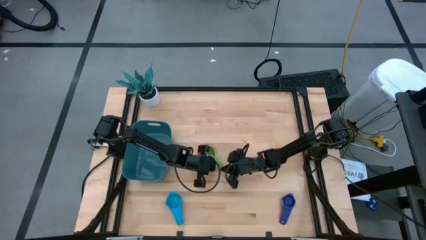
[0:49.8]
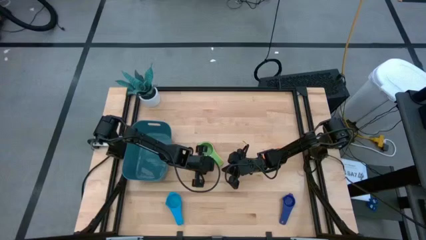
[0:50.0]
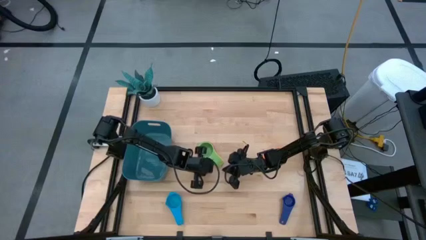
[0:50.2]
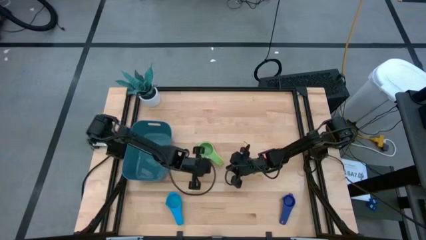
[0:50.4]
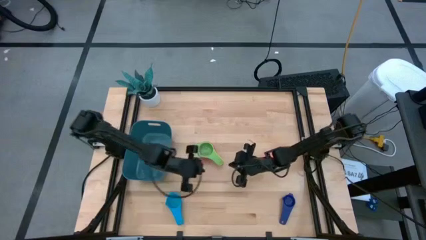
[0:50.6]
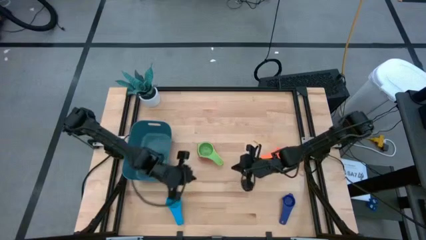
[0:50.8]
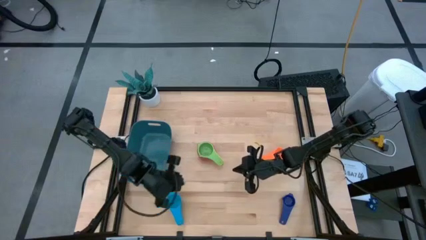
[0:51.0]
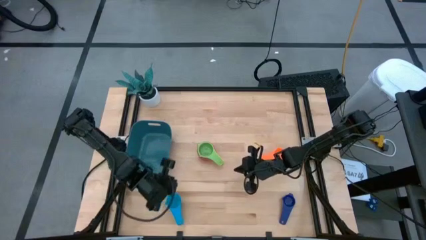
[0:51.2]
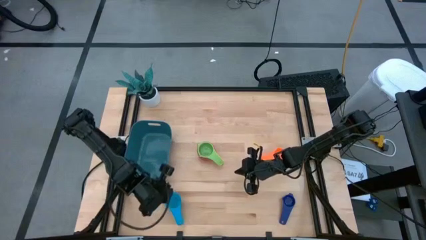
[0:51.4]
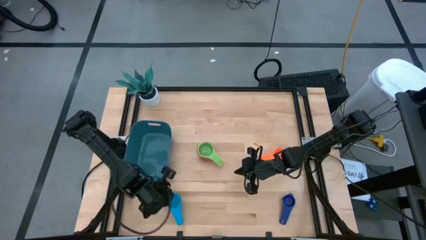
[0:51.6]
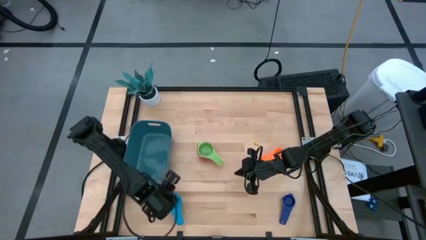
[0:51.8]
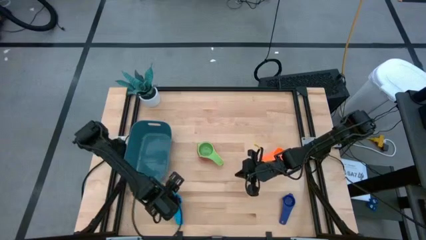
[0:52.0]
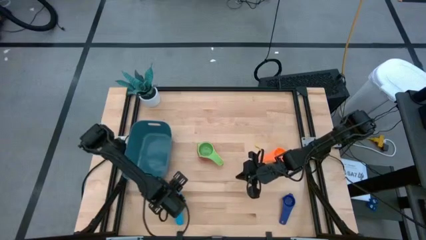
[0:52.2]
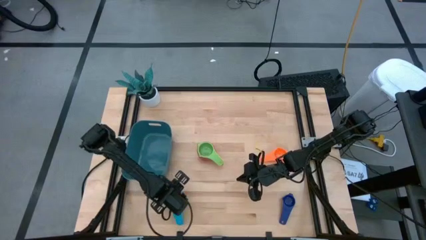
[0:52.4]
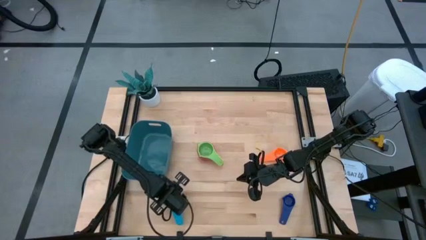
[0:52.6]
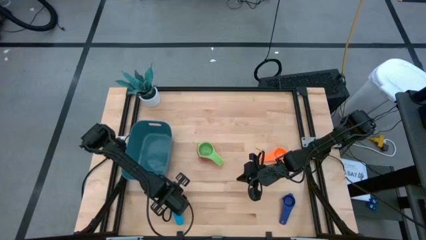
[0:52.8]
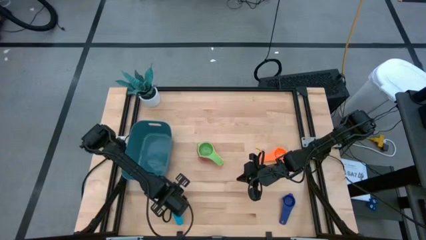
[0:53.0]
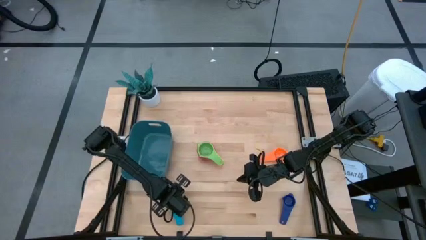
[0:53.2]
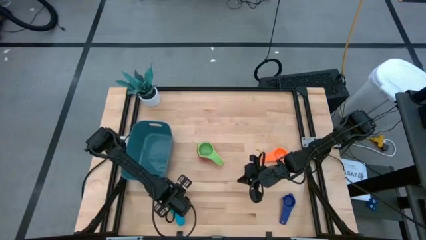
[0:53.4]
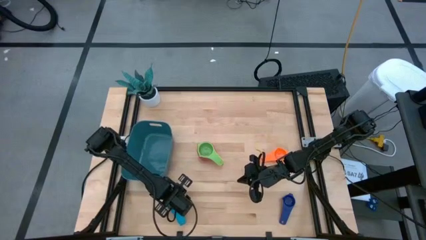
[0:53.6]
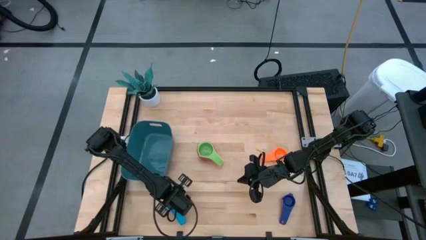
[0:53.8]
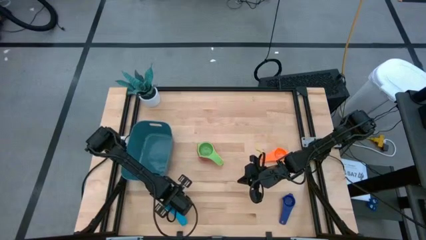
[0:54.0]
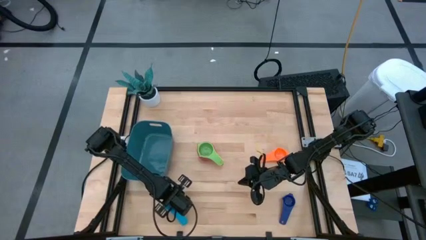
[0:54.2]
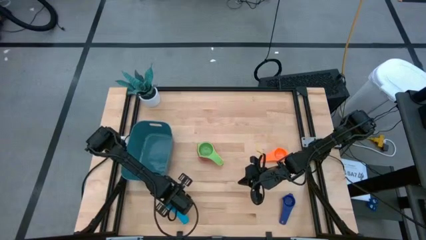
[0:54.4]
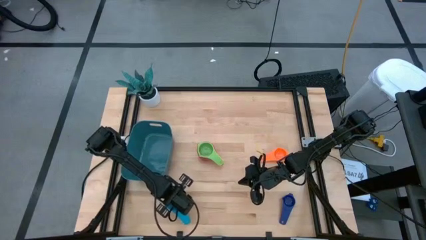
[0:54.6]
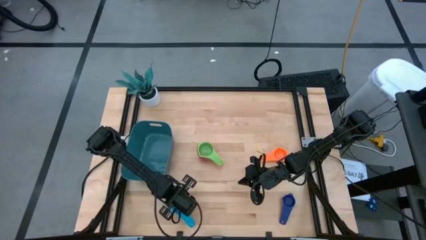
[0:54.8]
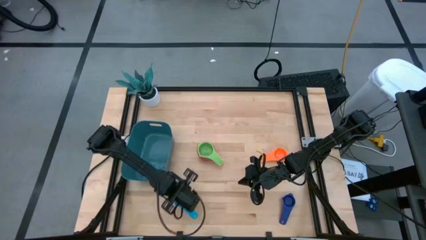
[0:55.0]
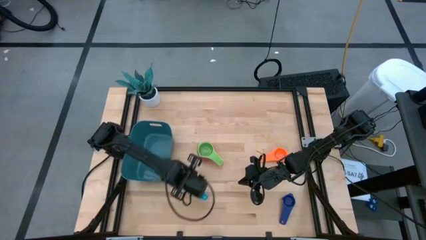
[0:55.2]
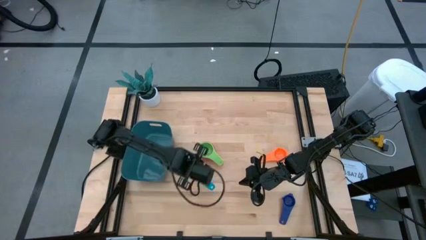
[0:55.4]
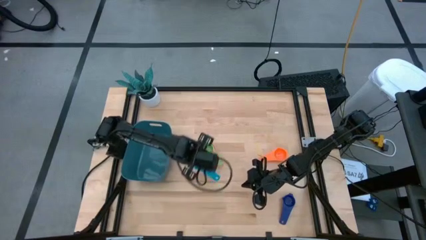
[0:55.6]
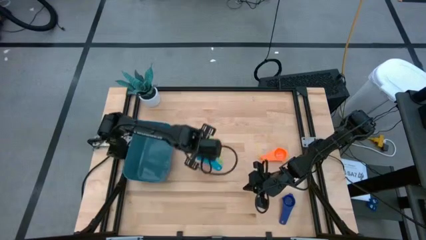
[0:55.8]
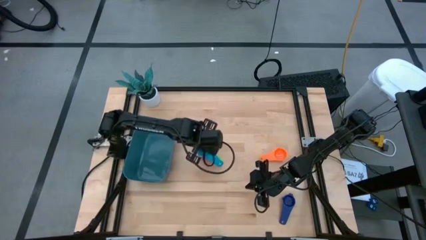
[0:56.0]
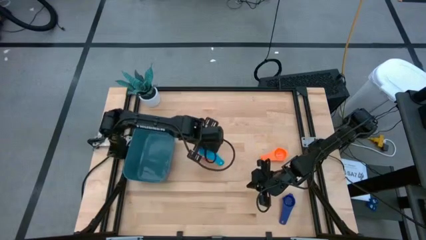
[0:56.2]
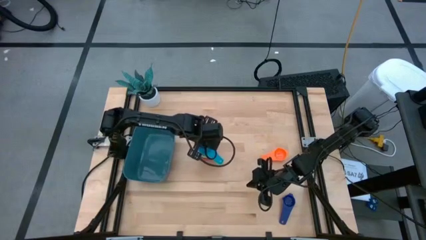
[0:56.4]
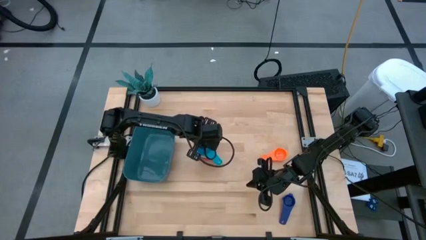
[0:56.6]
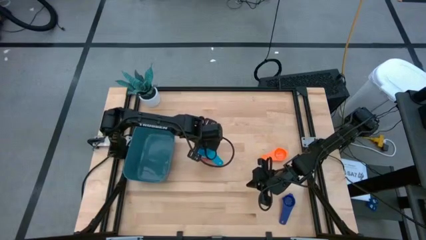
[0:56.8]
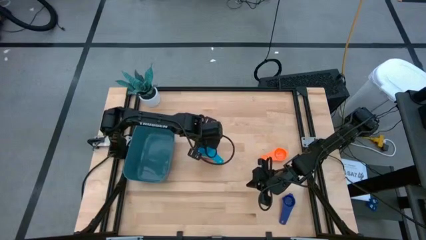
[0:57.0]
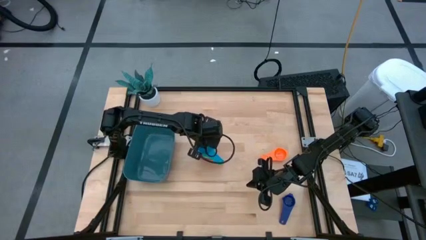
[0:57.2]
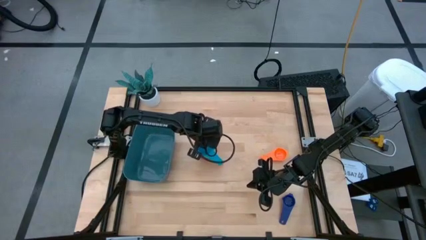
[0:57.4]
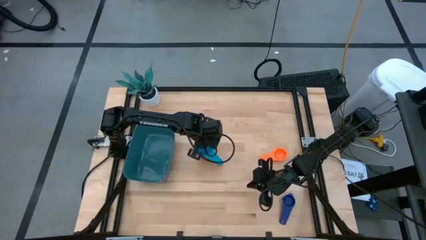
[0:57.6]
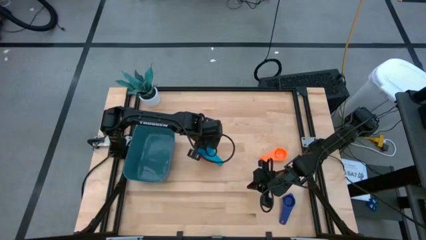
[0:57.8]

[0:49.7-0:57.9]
Task: Nest measuring cups in basket
Stack the light blue measuring cup on top of the green measuring cup

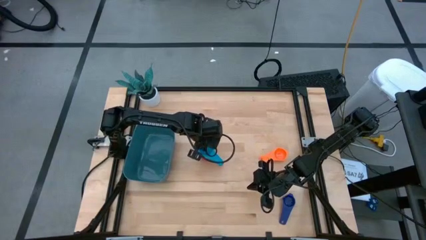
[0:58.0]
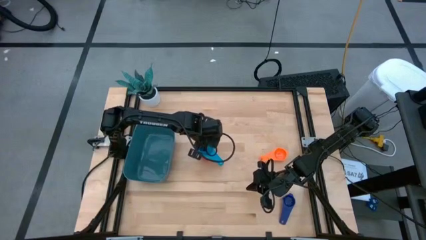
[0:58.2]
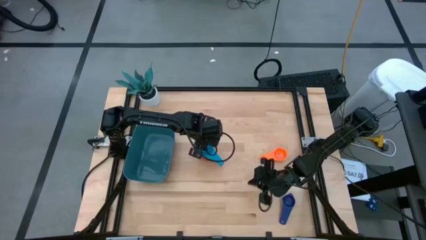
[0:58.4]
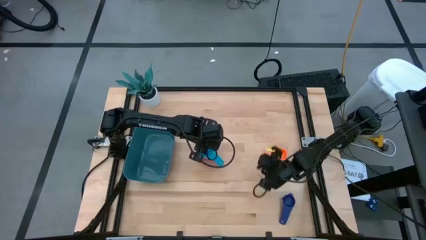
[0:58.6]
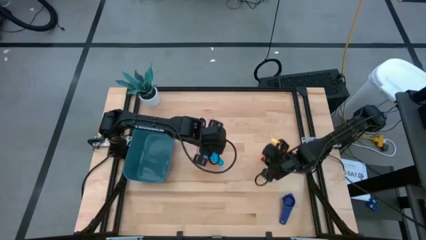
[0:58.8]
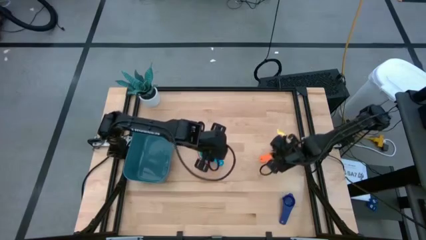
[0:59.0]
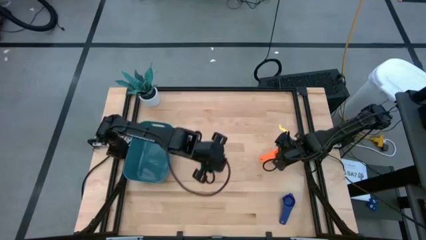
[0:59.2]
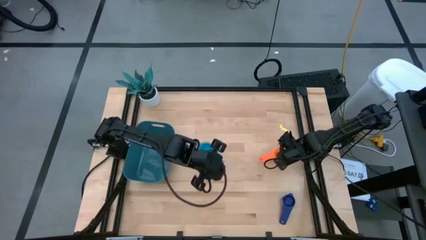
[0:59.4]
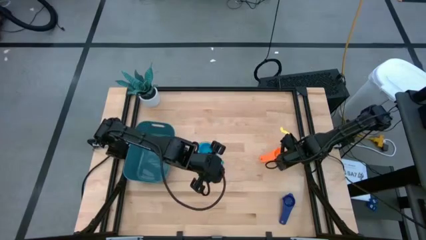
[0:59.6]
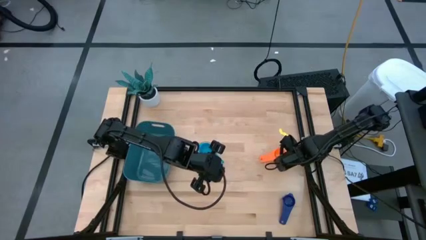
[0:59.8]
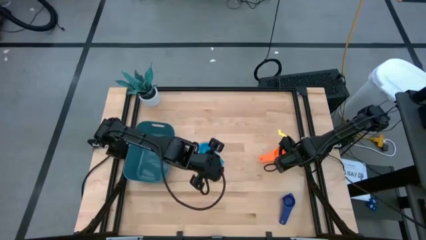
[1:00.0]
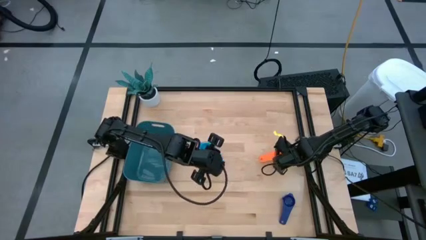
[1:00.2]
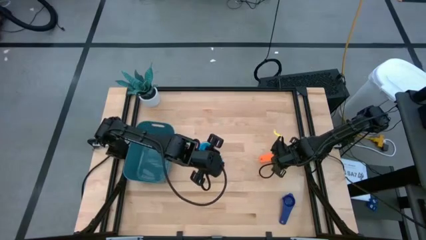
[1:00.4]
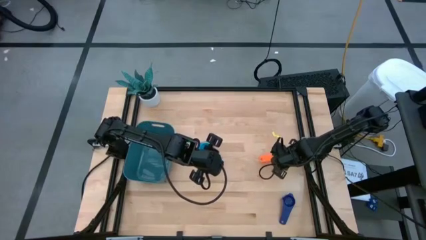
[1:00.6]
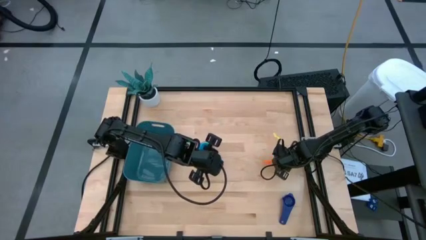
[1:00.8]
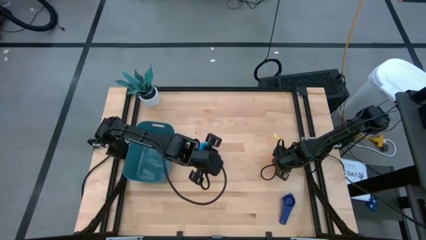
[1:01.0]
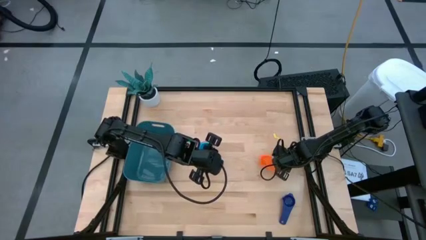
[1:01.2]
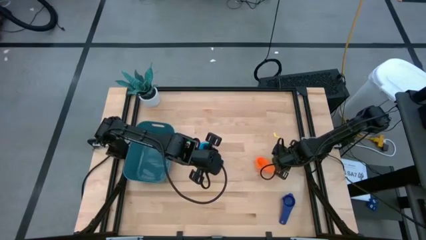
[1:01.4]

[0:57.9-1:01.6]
Stack the orange measuring cup on top of the light blue measuring cup

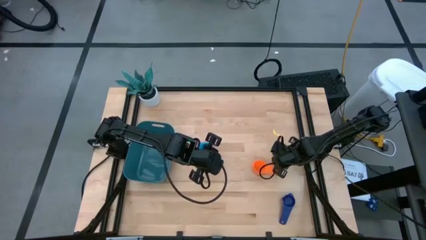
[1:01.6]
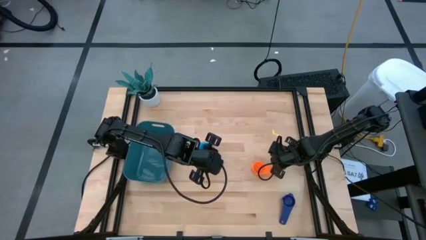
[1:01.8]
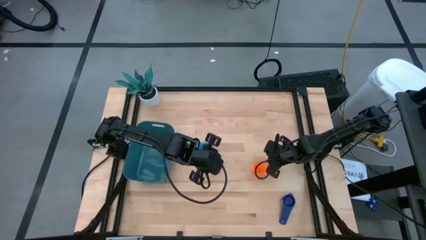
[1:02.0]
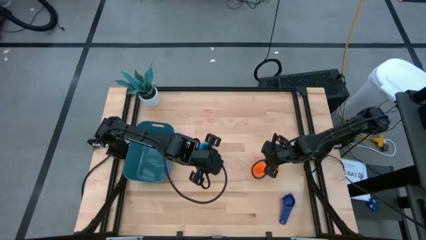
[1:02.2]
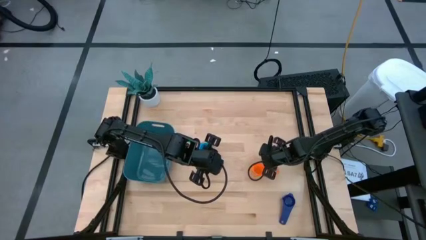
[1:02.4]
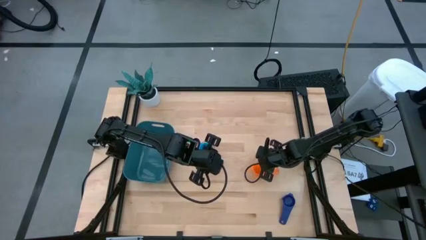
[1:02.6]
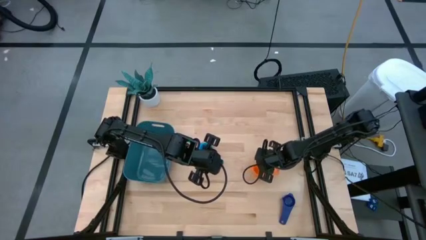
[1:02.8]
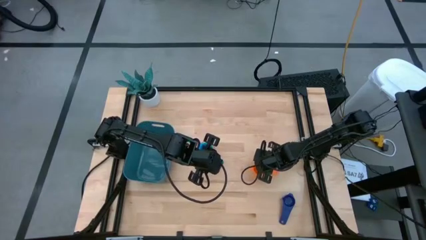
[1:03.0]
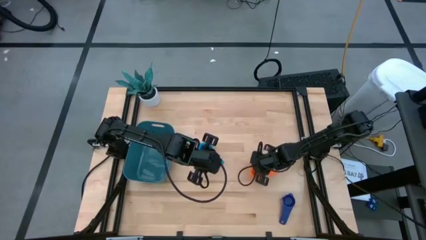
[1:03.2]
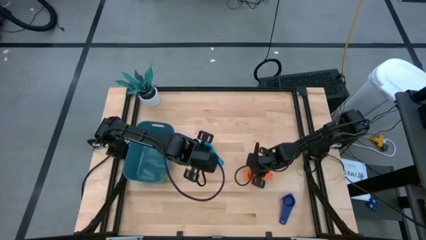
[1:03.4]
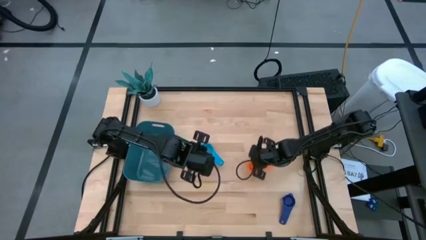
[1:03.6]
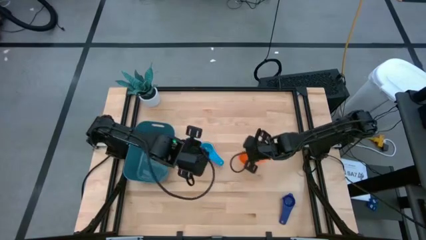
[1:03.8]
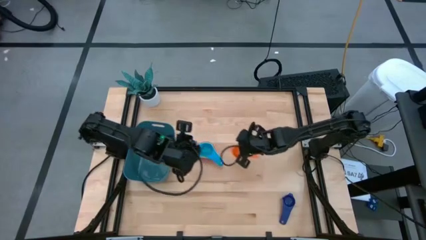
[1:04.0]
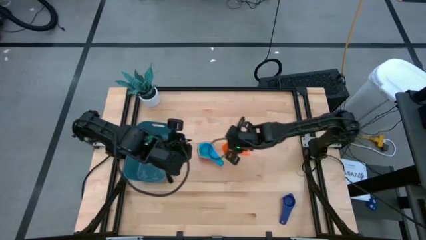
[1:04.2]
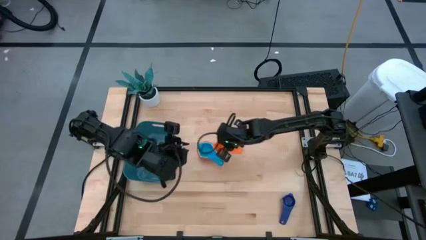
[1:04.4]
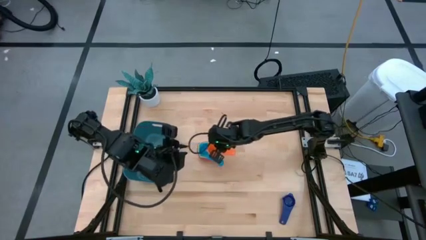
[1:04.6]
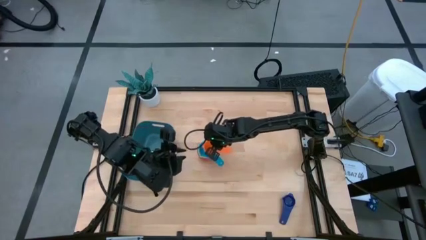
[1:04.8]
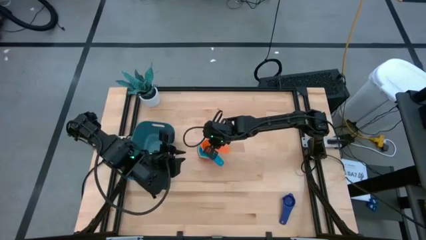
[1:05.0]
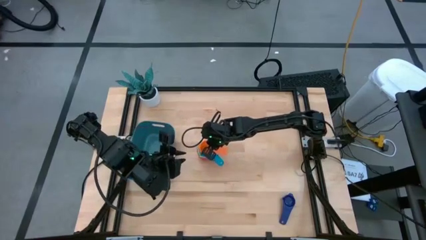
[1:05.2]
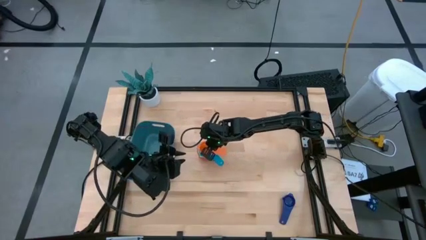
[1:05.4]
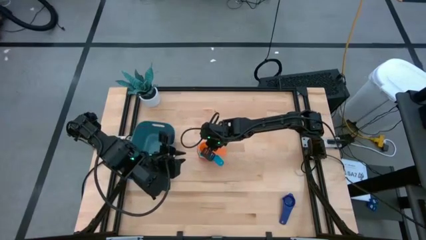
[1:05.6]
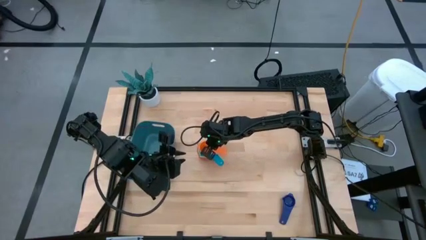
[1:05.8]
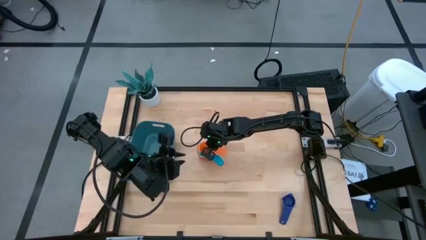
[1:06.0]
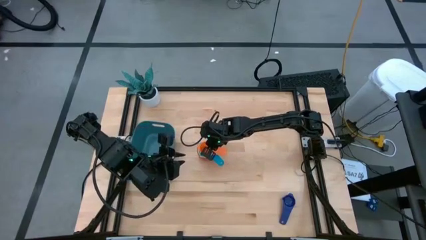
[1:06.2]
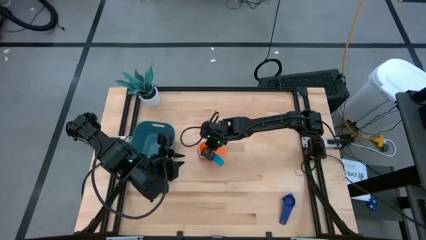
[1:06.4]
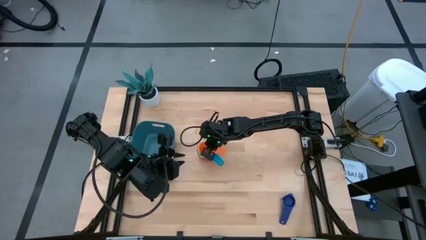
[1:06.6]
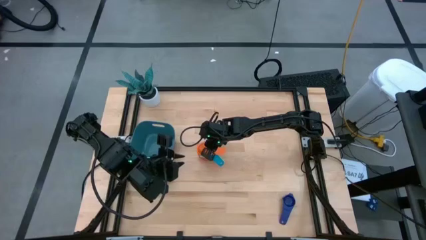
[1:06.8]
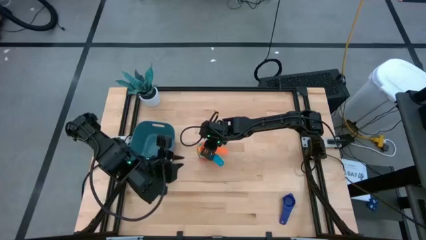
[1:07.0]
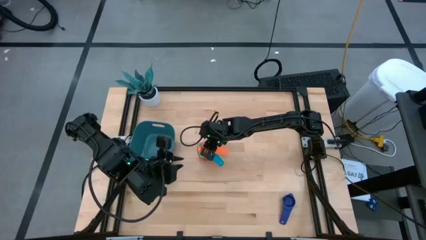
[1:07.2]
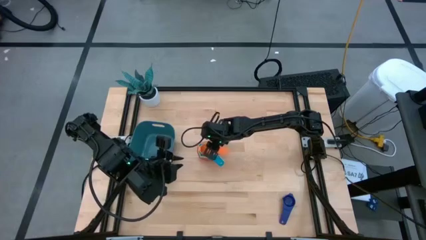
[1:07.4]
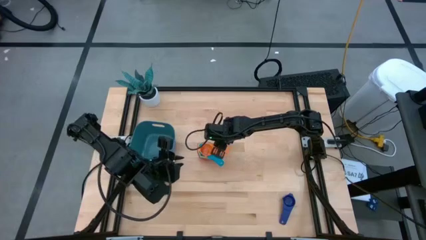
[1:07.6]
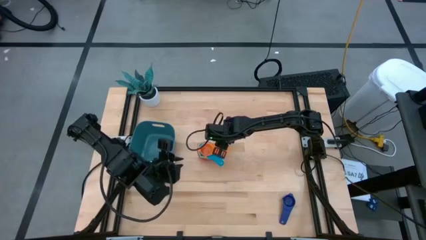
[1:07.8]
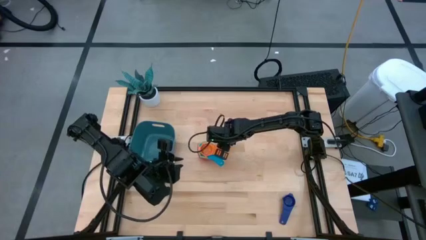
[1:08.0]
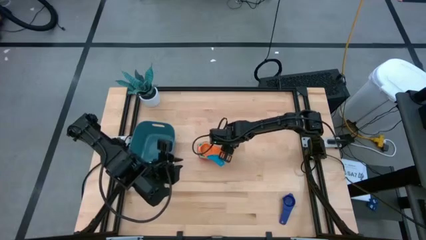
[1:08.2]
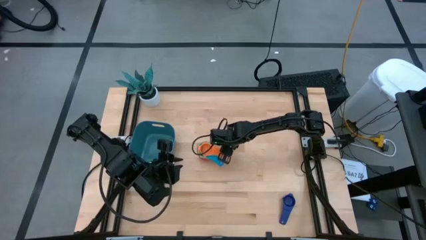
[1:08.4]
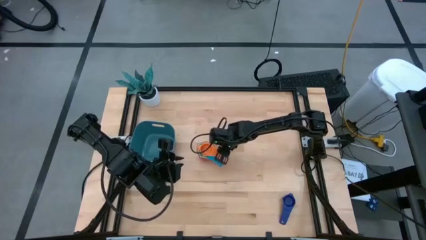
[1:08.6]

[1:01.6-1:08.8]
Stack the orange measuring cup on top of the light blue measuring cup
